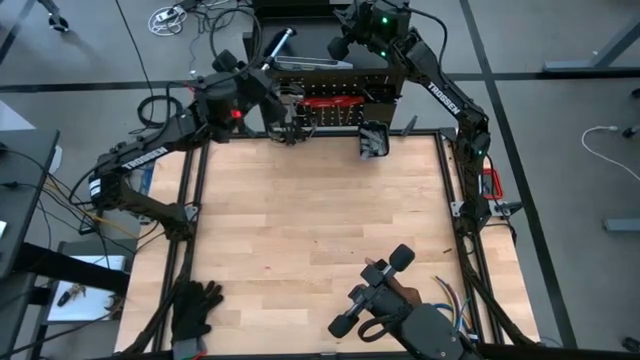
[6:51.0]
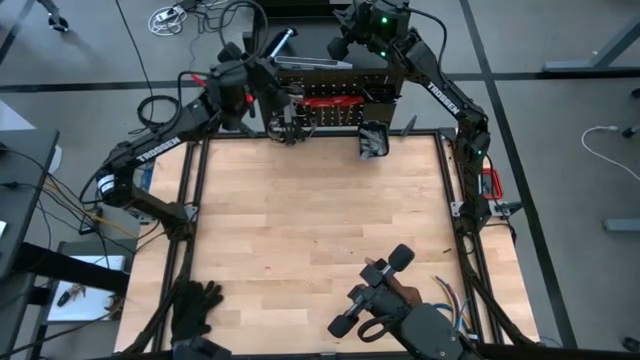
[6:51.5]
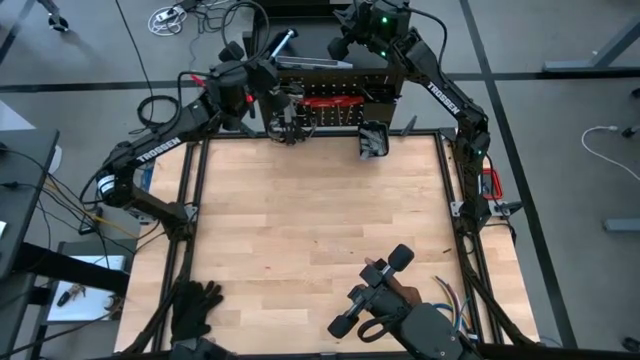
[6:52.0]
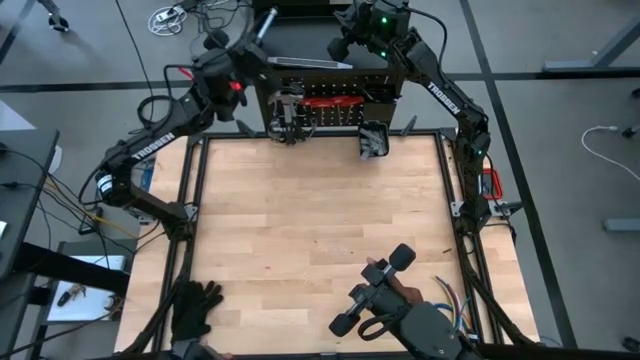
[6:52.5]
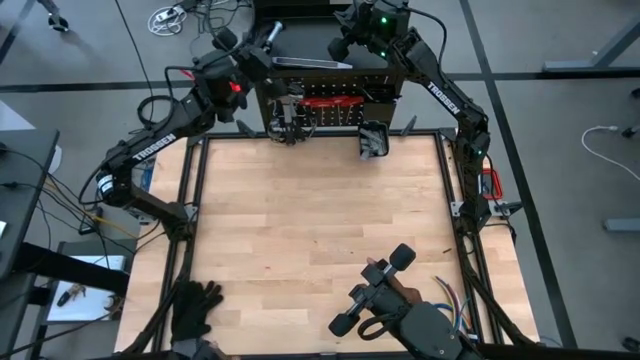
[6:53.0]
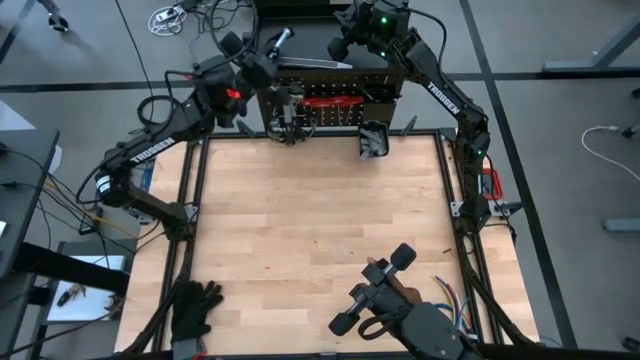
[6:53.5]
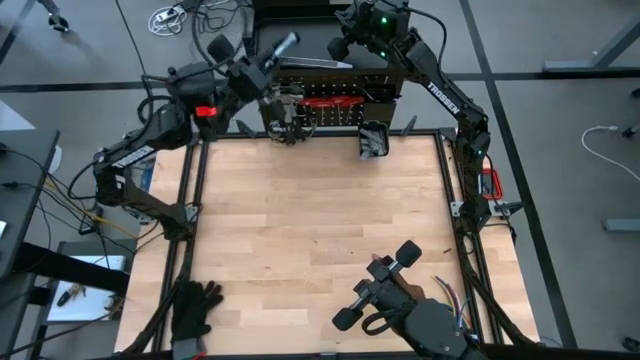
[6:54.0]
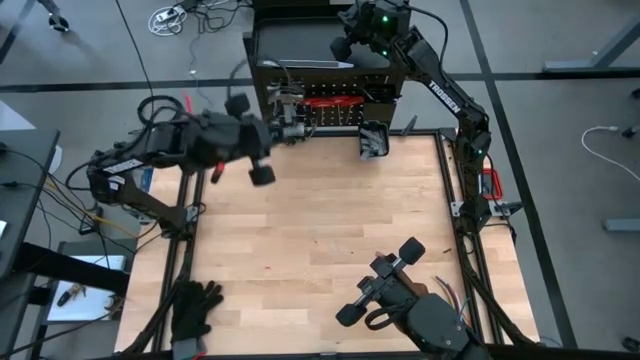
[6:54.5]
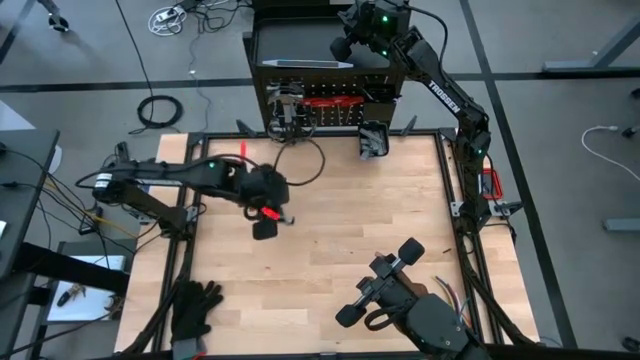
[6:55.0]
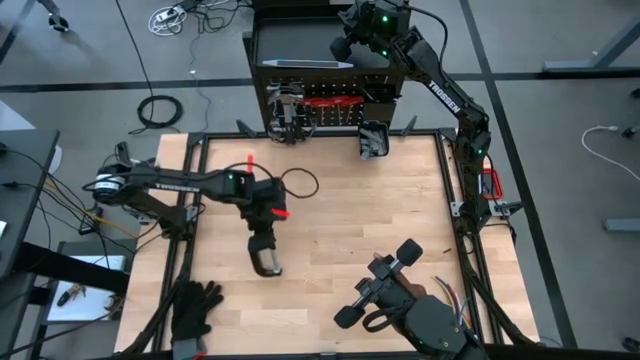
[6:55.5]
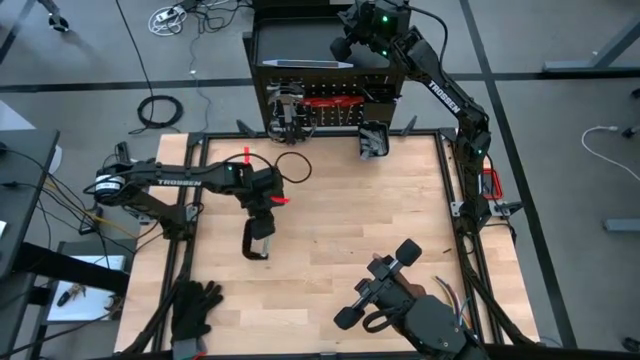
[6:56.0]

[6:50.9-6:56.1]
Task: Hang tools onto peg board
Put the C-clamp on the table

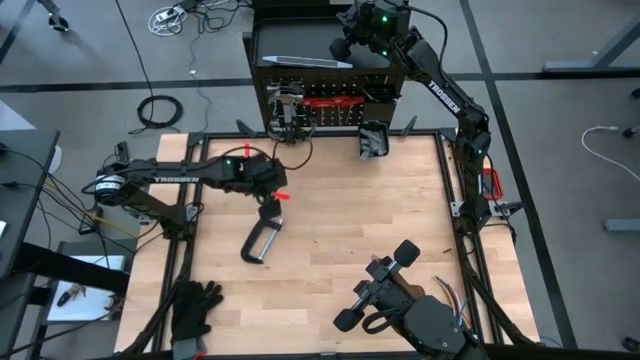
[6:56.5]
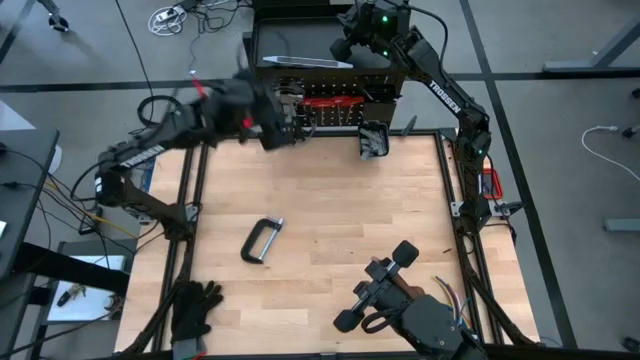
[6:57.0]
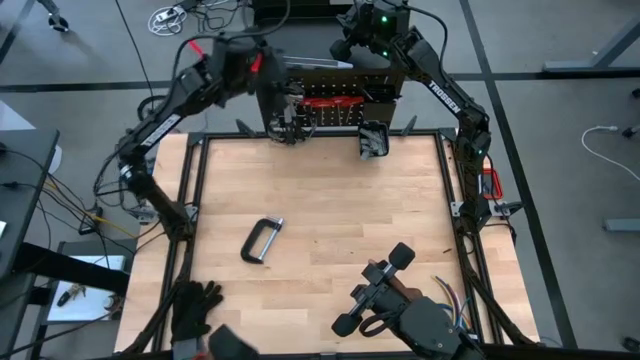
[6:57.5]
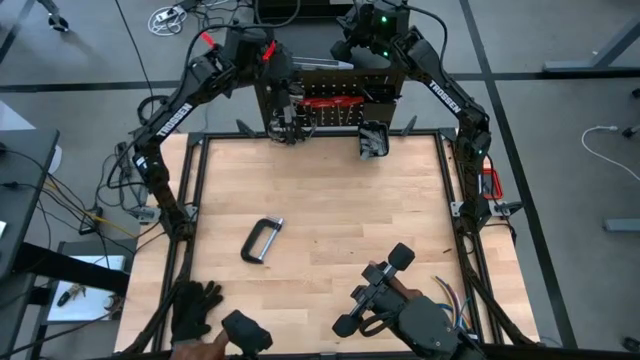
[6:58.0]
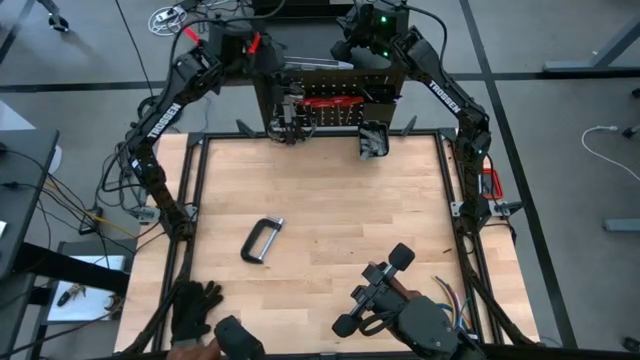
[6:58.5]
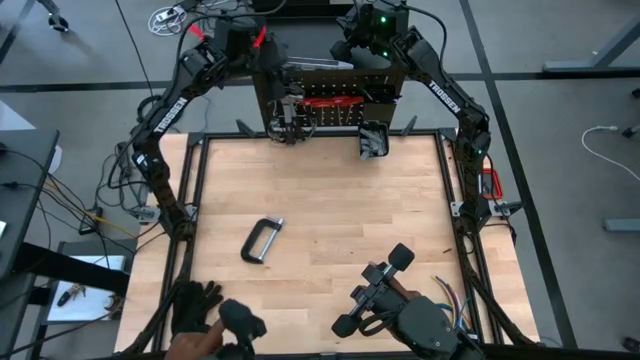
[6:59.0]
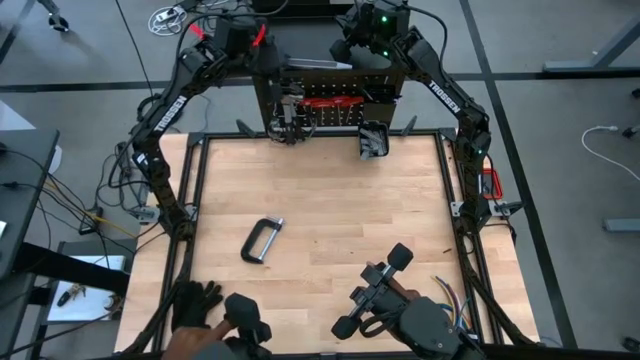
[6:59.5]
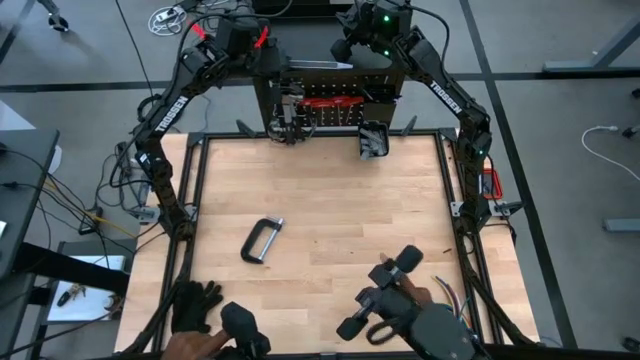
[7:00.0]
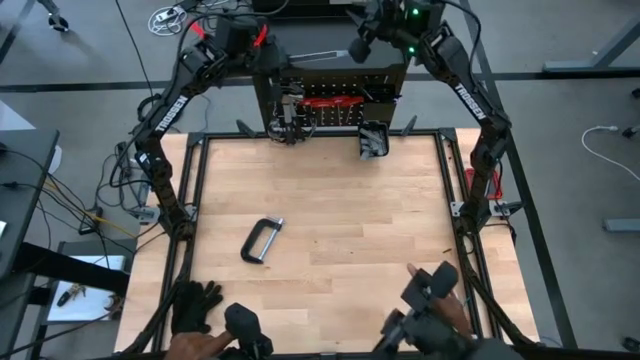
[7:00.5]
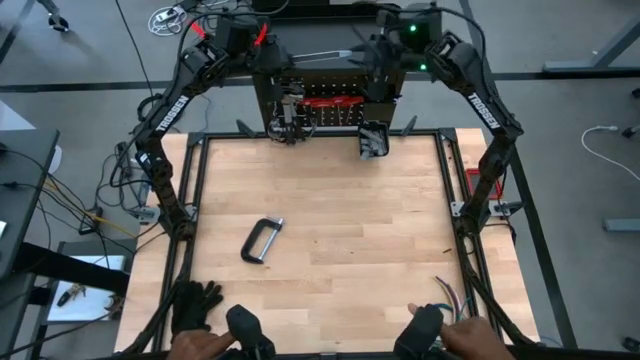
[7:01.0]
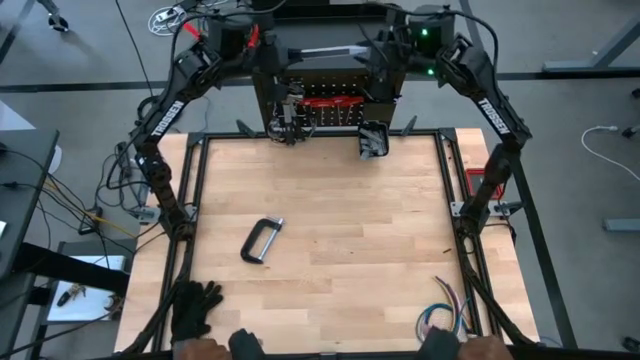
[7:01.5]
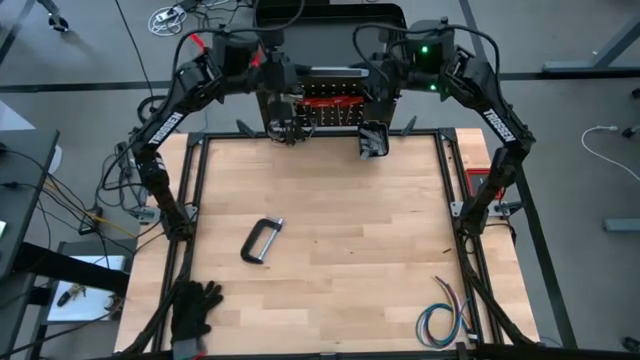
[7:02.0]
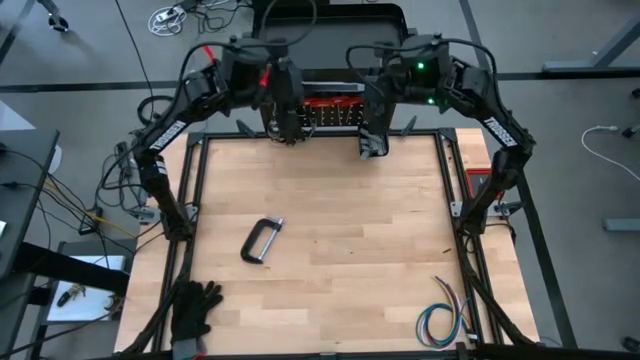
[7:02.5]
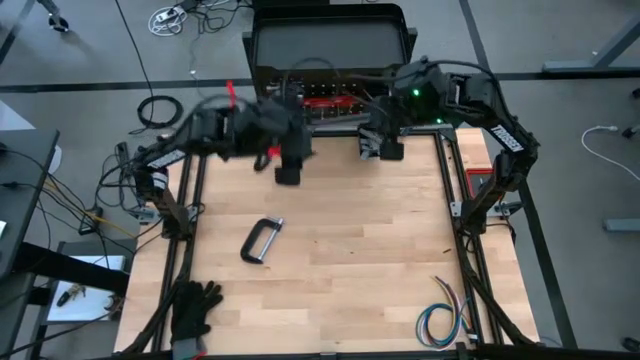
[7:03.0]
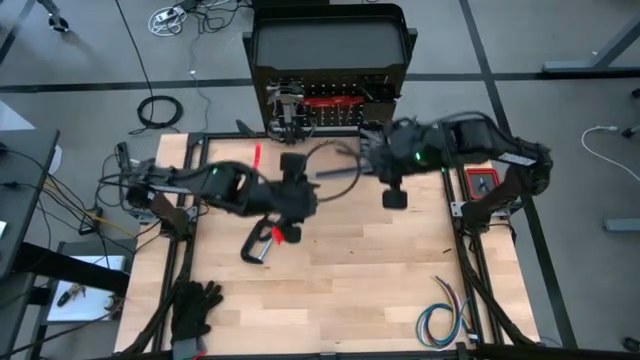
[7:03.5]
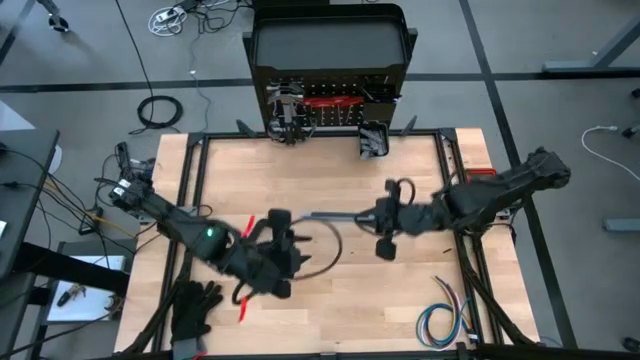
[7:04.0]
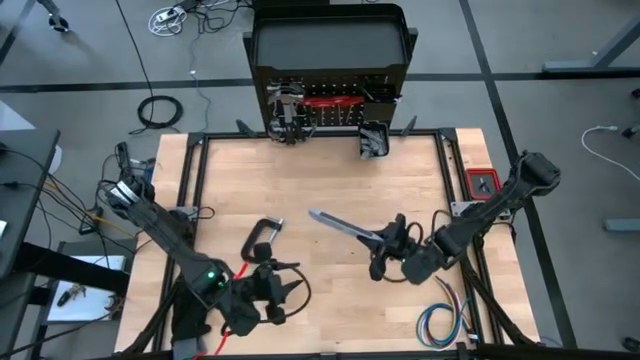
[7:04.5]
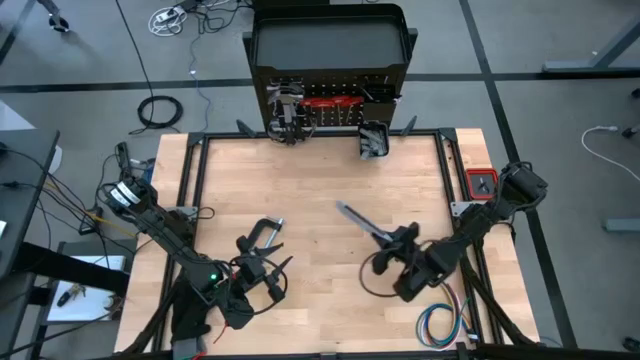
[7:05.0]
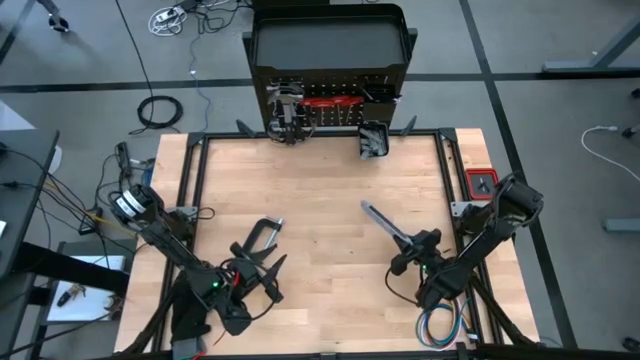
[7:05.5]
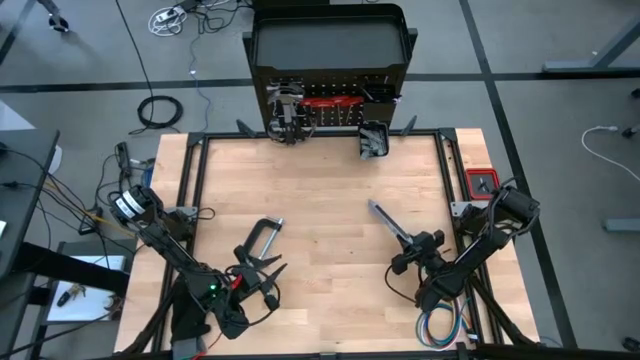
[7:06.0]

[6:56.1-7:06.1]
Put the spirit level on the table

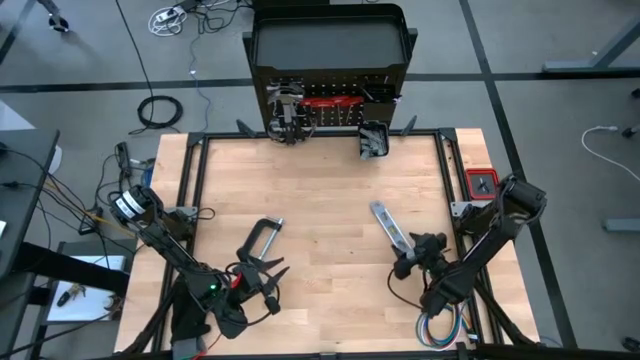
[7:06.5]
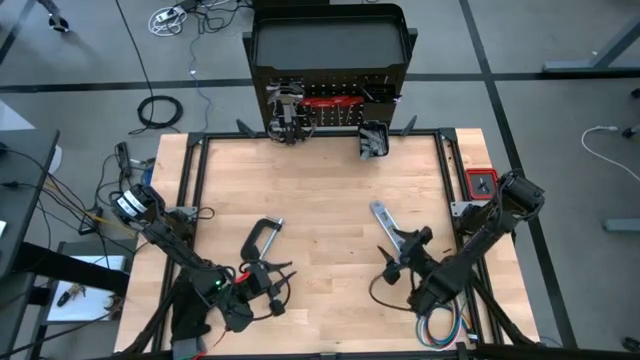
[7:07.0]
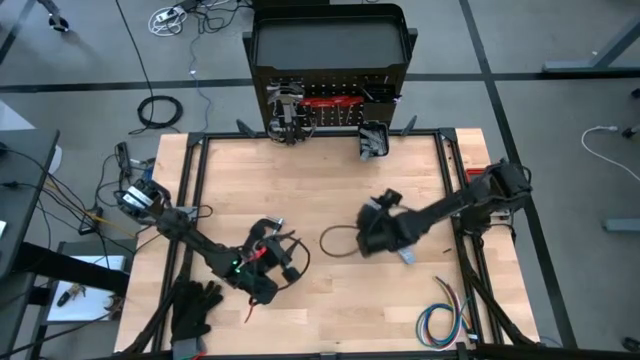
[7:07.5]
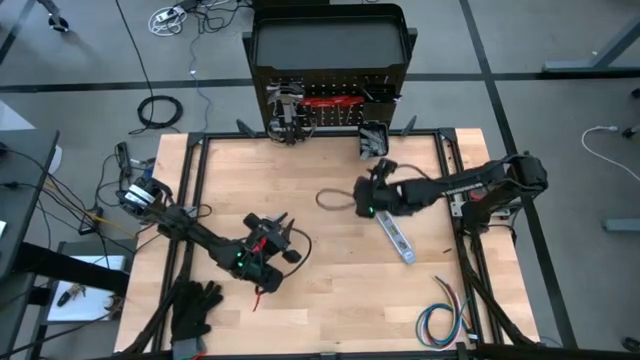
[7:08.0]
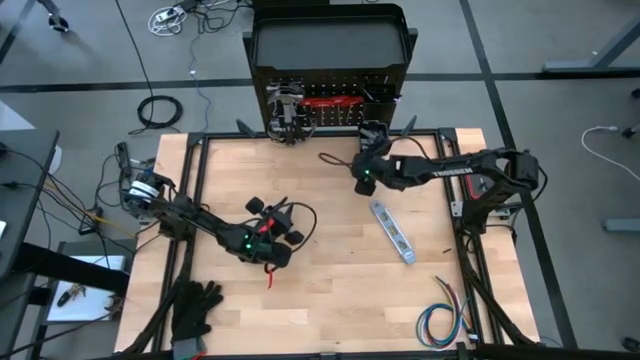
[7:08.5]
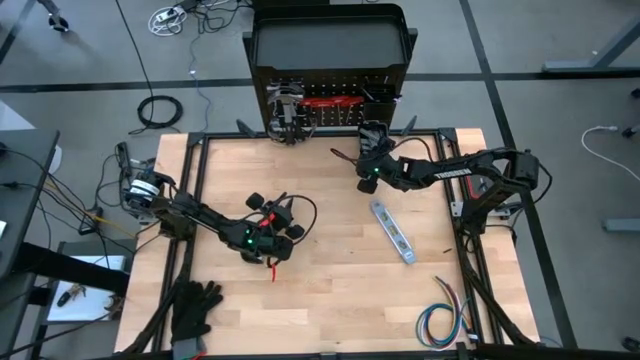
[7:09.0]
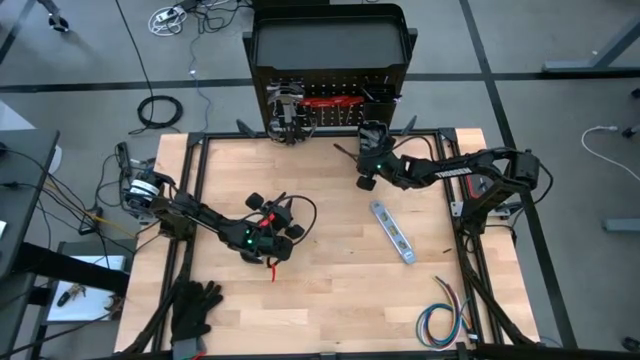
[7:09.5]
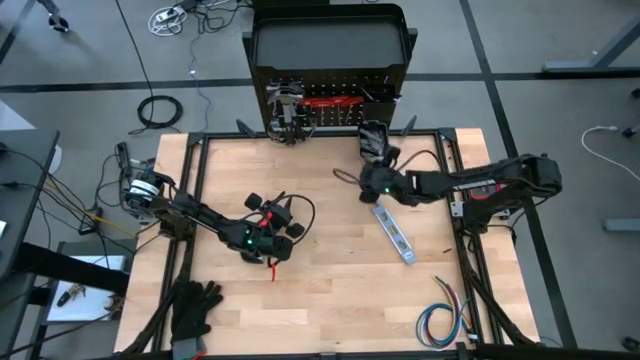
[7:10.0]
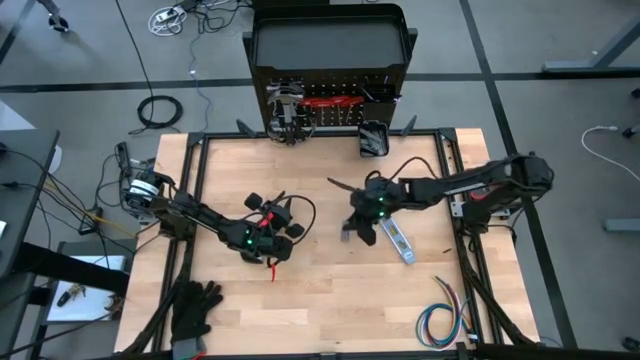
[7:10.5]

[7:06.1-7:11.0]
Put the screwdriver bits on the table

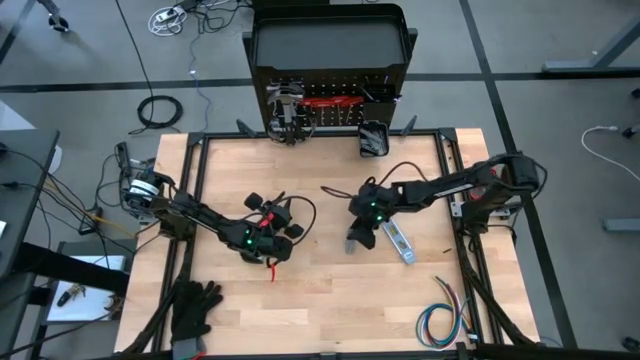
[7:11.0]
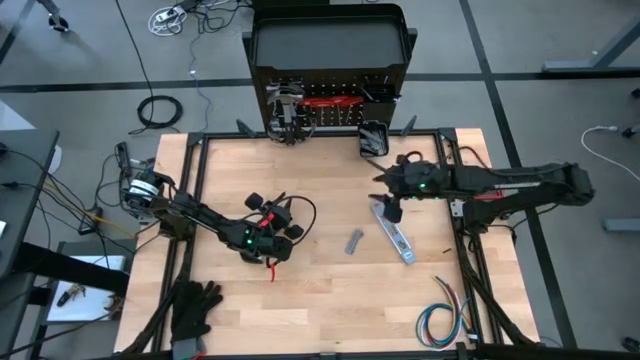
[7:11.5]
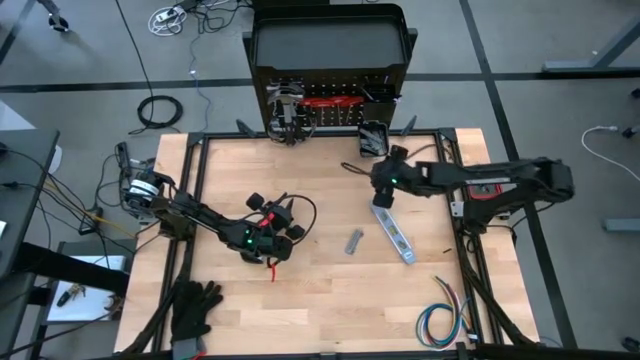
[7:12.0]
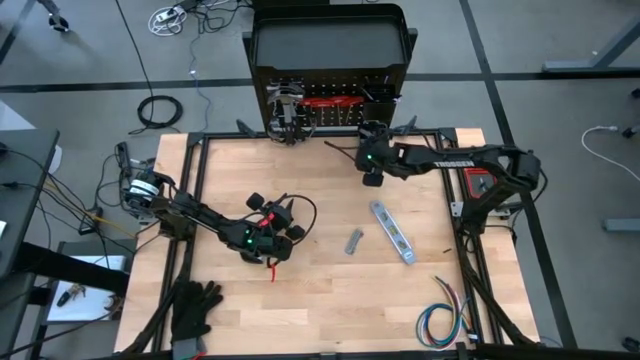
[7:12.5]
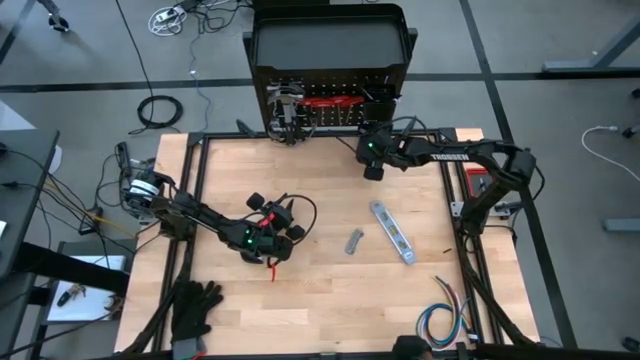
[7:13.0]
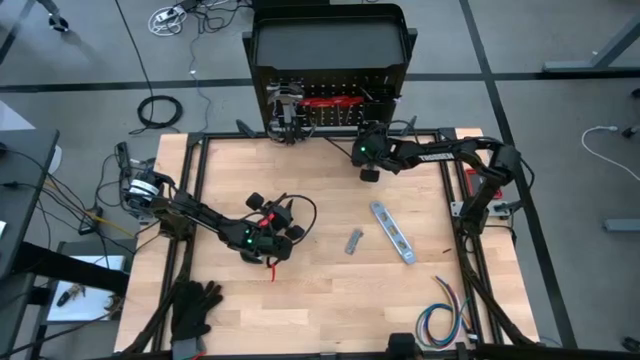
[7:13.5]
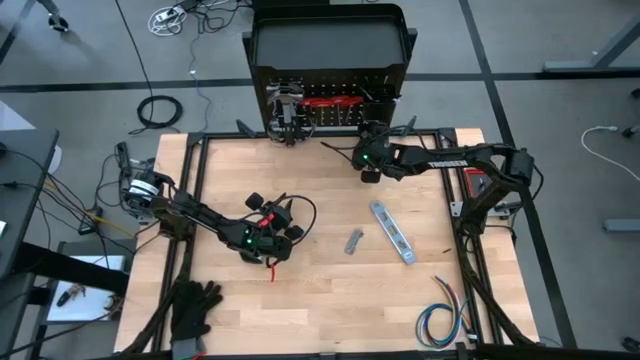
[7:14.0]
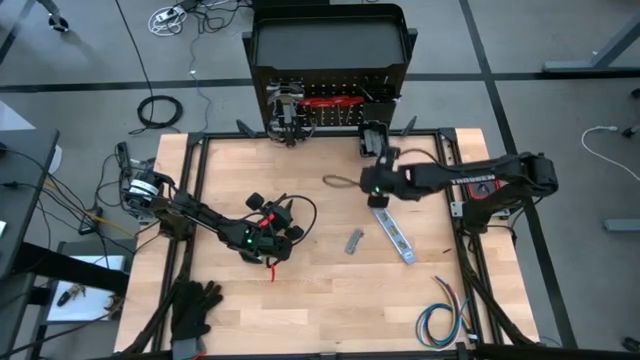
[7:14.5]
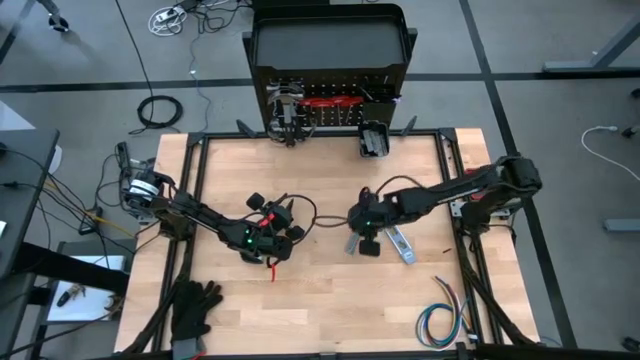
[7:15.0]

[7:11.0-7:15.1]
Put the screwdriver bits on the table
